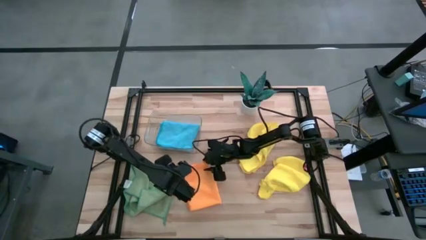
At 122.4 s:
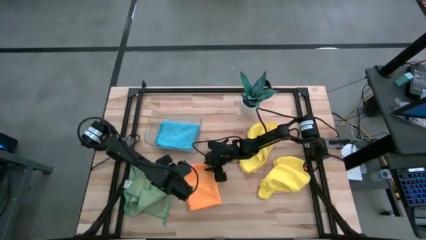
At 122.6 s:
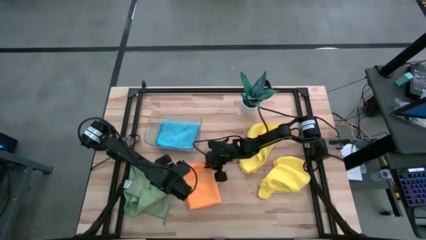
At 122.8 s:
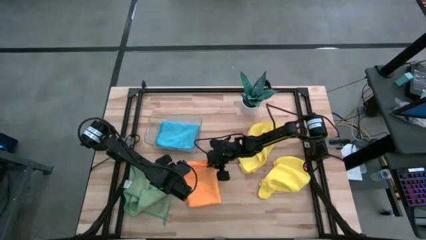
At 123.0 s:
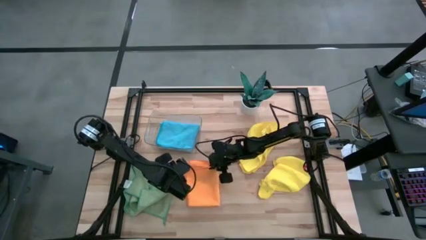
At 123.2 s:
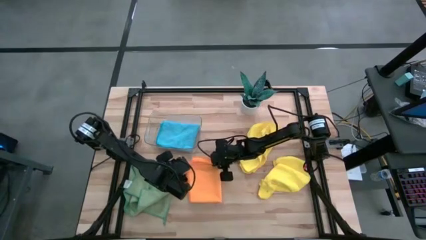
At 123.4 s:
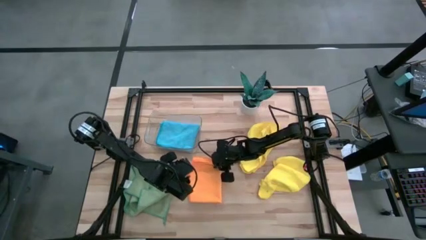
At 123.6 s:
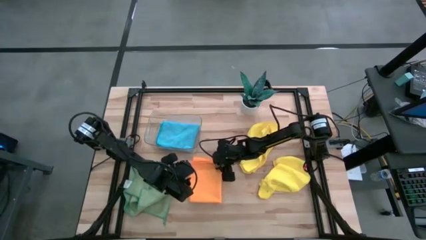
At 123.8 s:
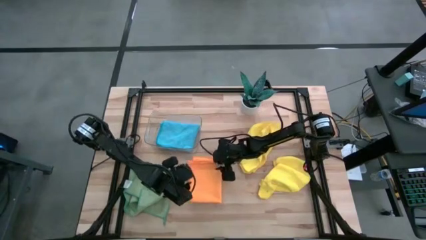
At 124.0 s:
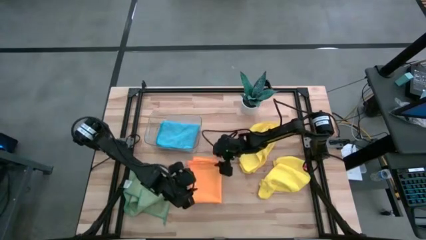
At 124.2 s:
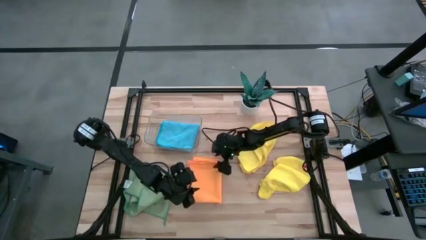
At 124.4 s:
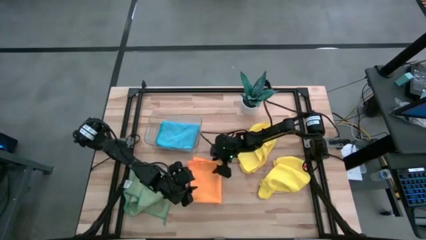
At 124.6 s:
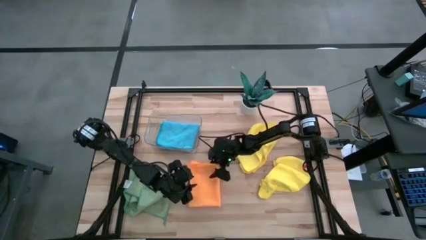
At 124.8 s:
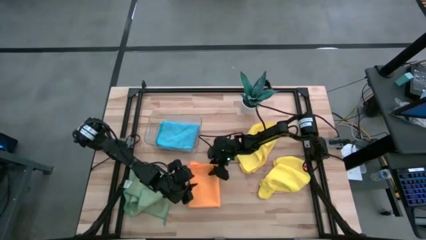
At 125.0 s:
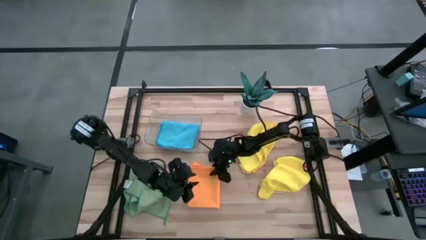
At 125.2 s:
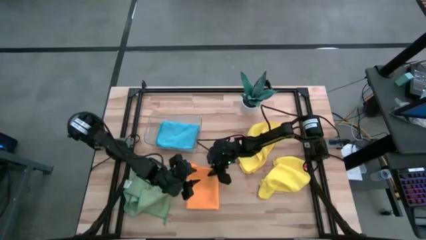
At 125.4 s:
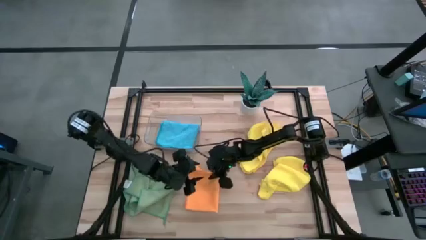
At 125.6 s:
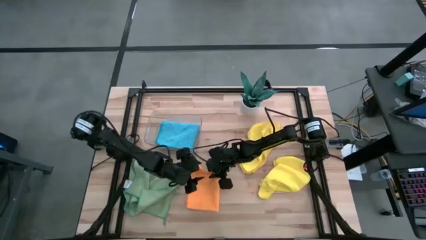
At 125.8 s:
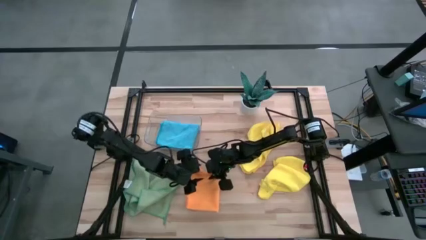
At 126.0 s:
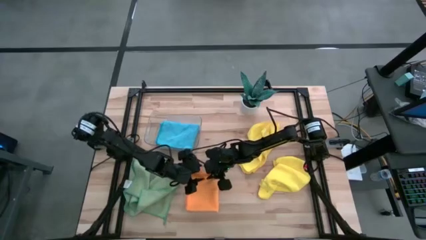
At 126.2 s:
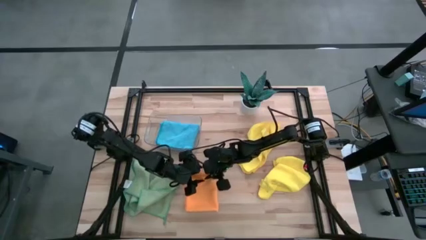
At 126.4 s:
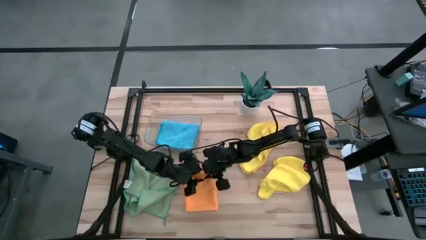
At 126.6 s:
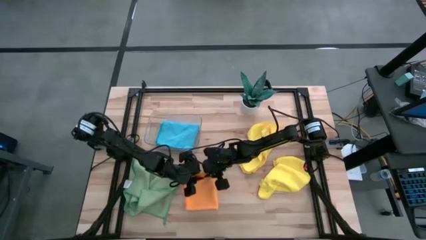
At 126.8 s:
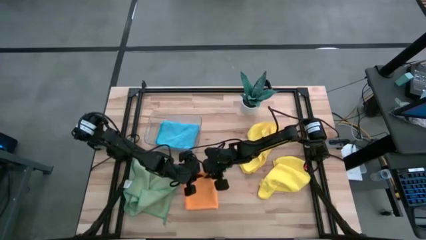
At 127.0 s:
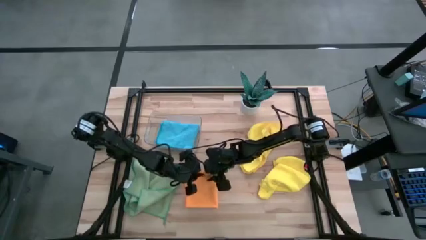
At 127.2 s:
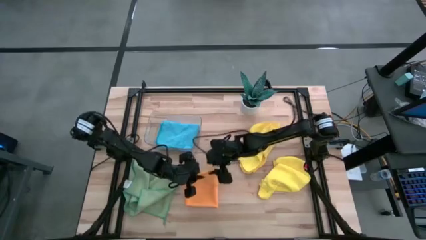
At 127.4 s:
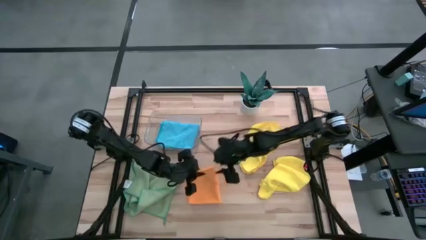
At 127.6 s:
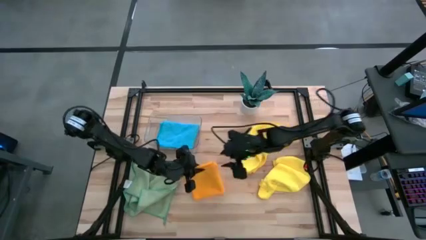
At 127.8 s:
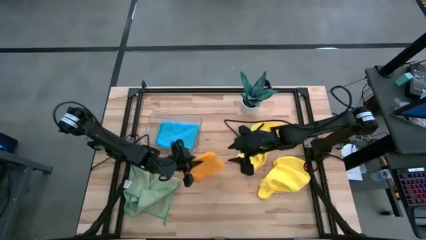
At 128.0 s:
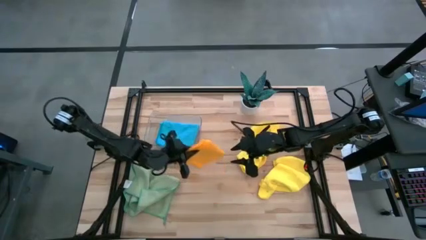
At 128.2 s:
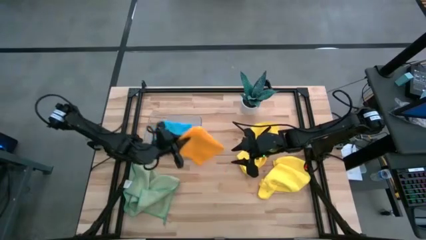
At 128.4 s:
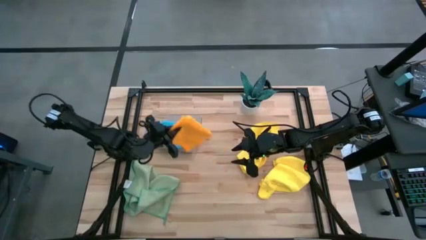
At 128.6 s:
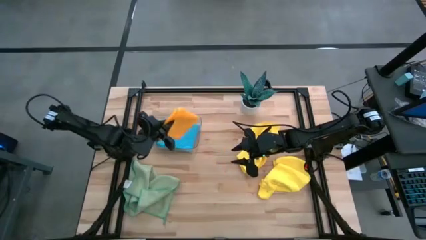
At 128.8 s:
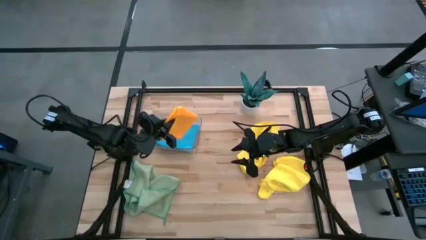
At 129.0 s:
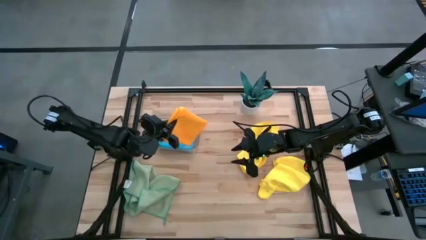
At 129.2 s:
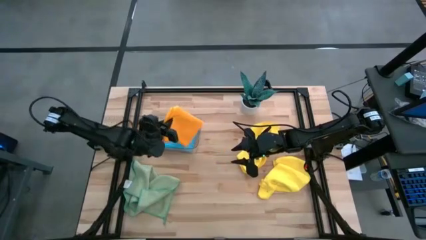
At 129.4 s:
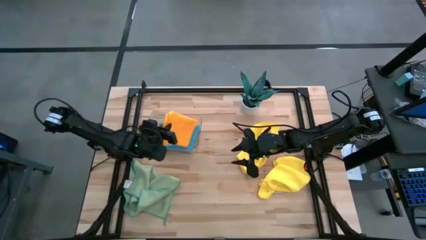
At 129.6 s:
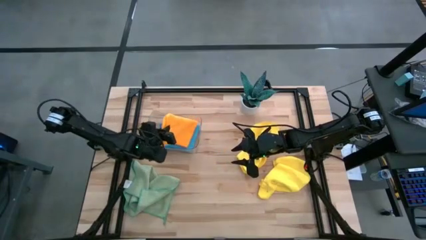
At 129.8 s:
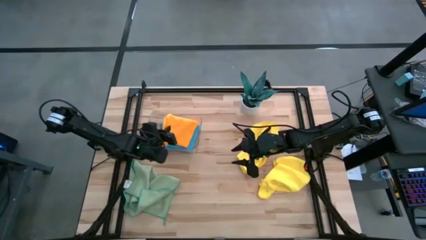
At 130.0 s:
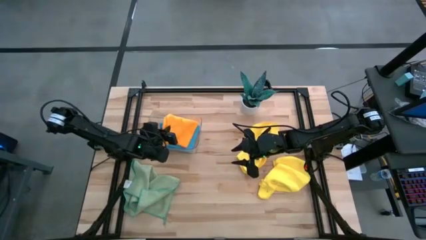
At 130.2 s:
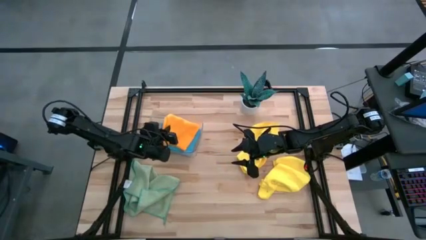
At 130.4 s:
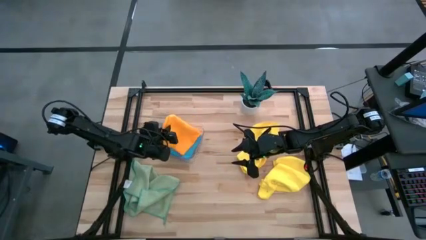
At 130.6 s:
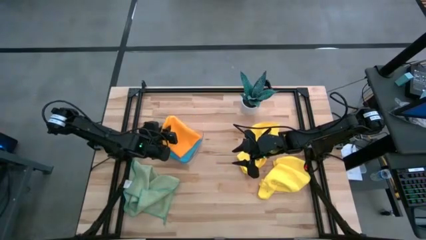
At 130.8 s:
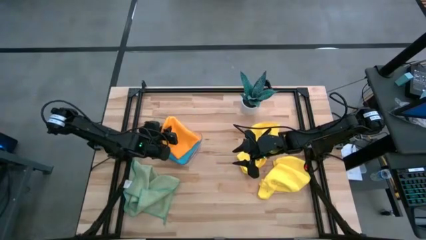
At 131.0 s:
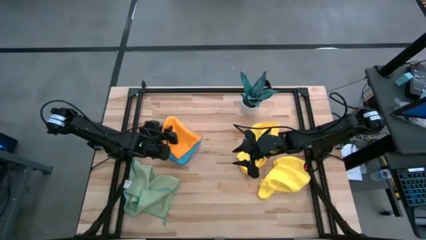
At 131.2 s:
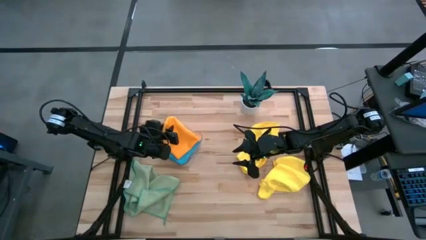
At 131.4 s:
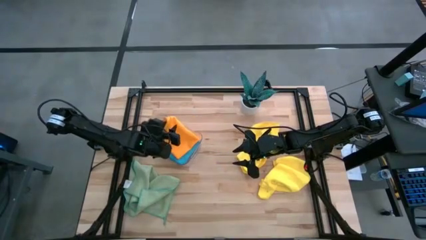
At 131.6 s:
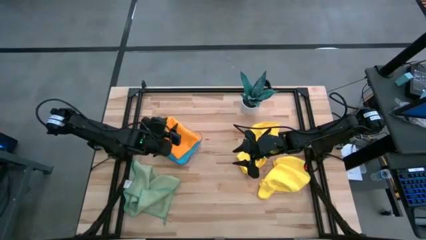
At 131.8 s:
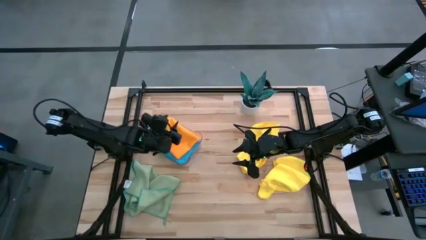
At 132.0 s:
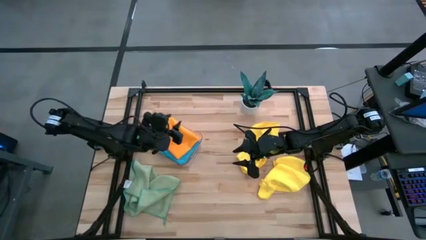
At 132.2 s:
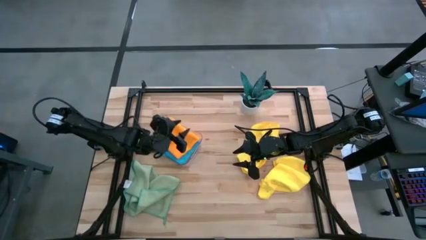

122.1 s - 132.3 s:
Task: Fold microfiber towels
Put the orange microfiber cloth into the transparent bin

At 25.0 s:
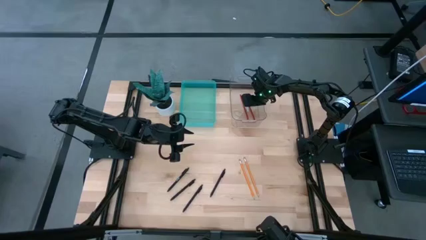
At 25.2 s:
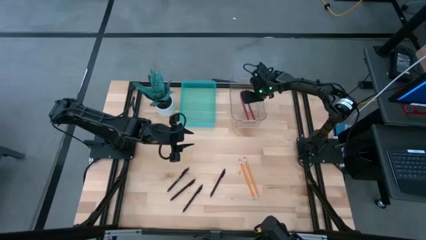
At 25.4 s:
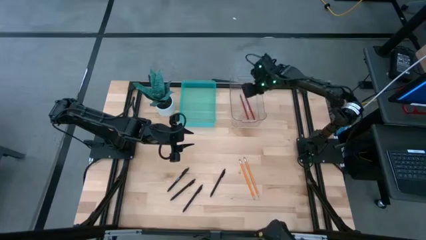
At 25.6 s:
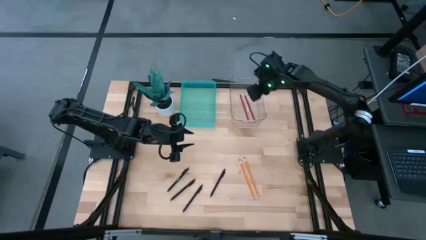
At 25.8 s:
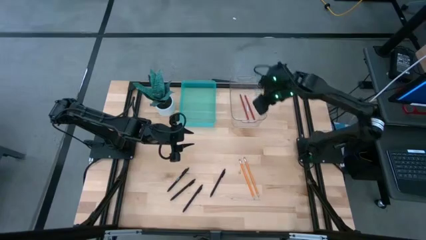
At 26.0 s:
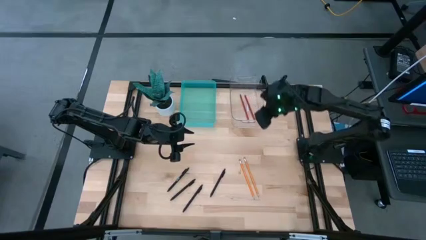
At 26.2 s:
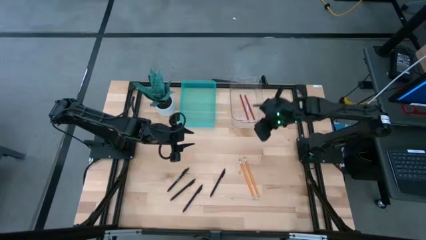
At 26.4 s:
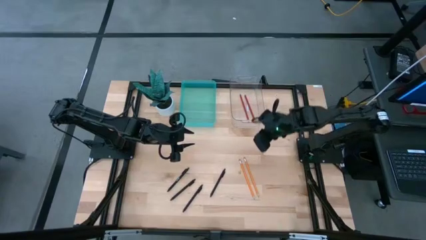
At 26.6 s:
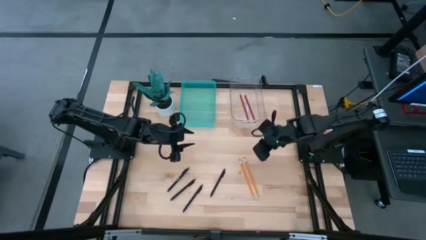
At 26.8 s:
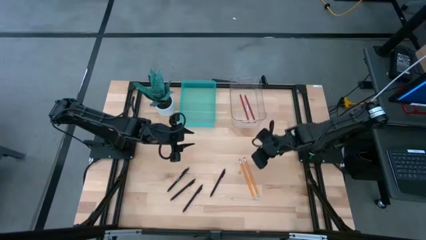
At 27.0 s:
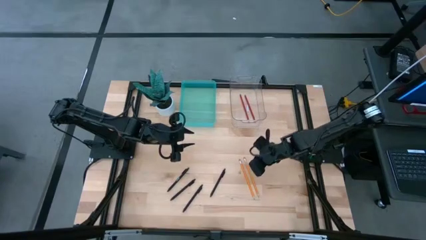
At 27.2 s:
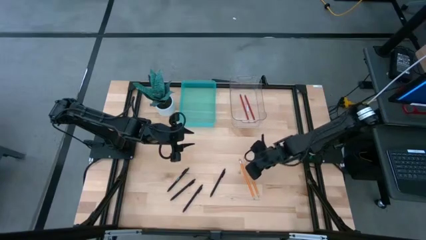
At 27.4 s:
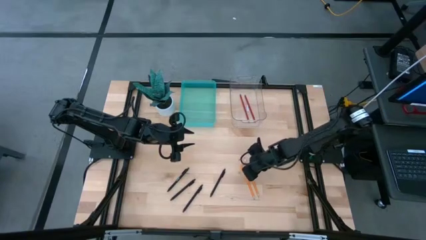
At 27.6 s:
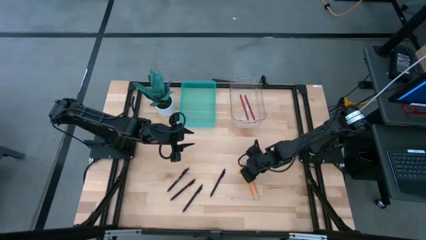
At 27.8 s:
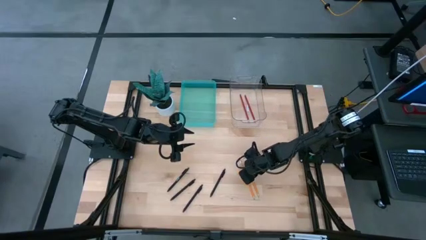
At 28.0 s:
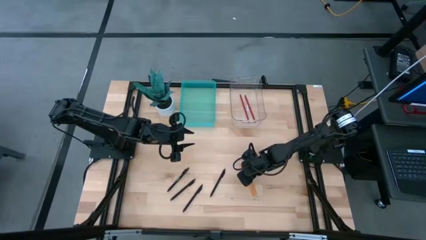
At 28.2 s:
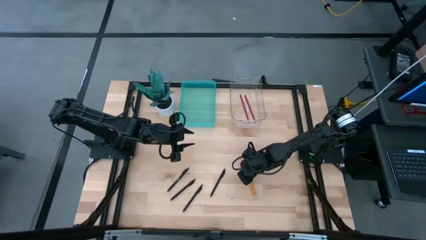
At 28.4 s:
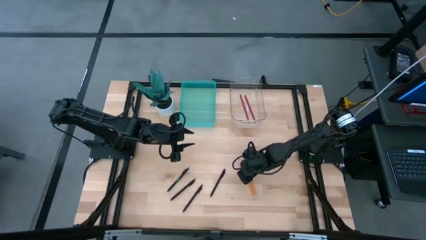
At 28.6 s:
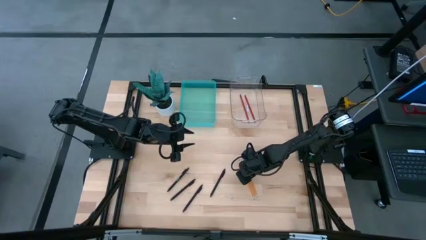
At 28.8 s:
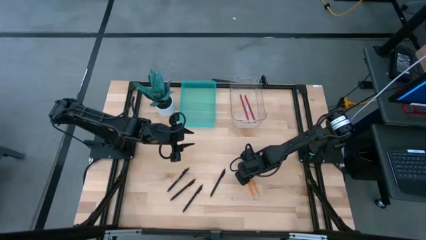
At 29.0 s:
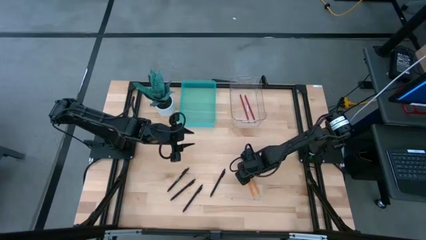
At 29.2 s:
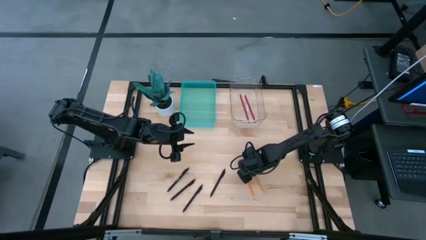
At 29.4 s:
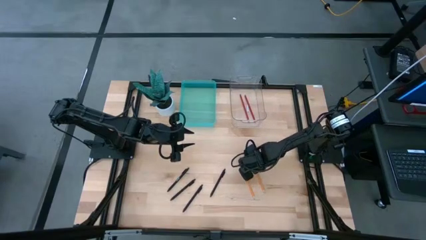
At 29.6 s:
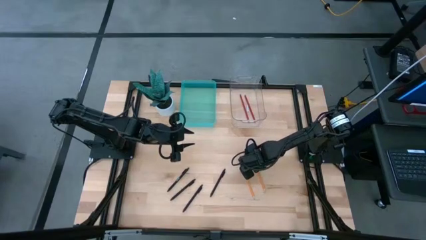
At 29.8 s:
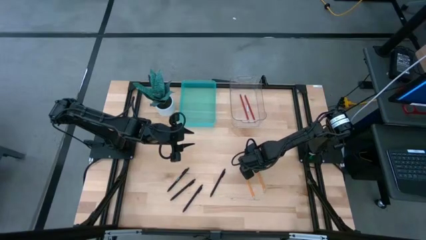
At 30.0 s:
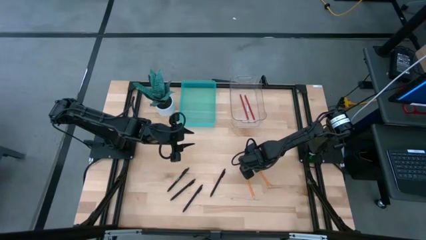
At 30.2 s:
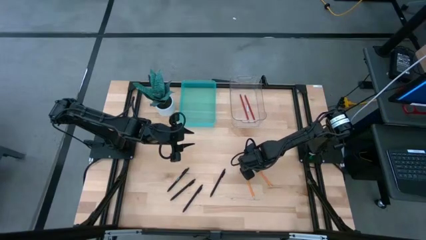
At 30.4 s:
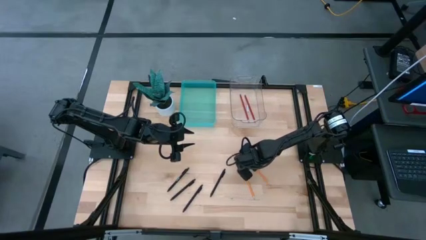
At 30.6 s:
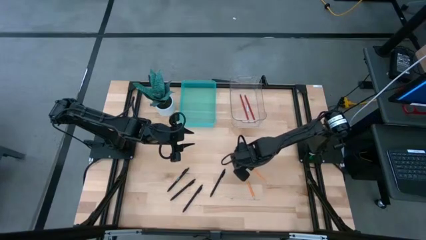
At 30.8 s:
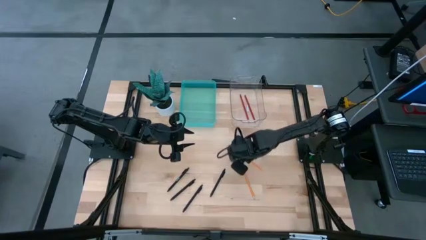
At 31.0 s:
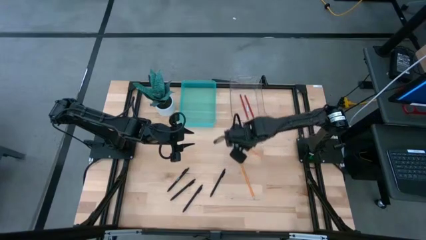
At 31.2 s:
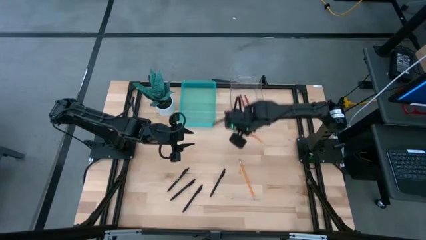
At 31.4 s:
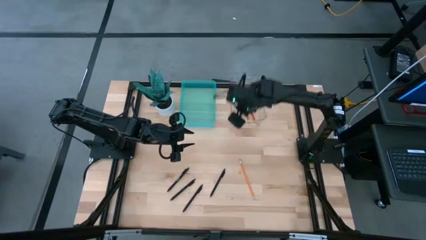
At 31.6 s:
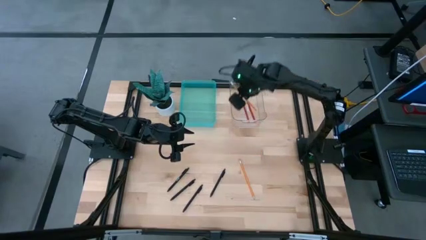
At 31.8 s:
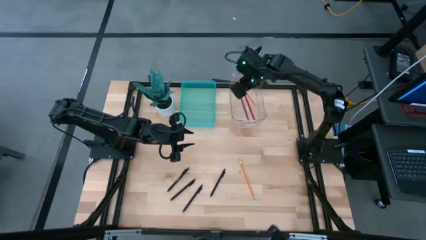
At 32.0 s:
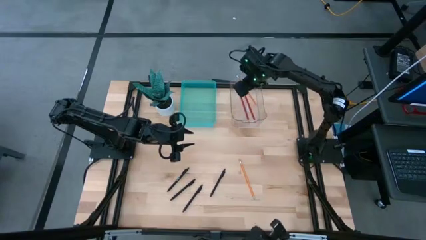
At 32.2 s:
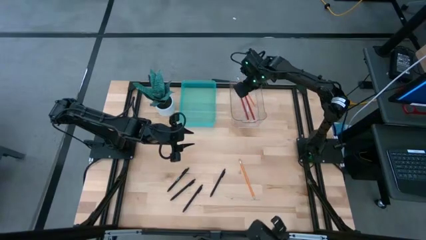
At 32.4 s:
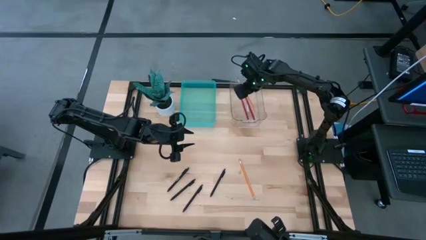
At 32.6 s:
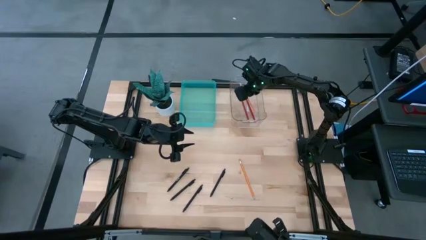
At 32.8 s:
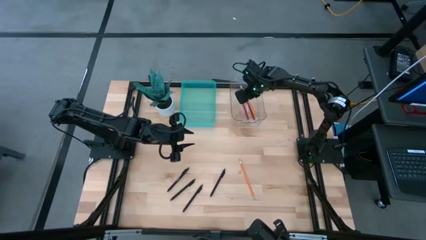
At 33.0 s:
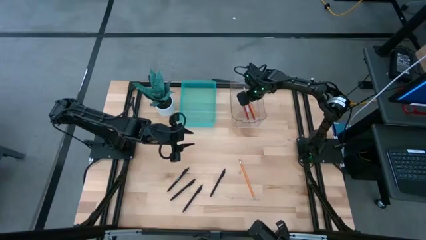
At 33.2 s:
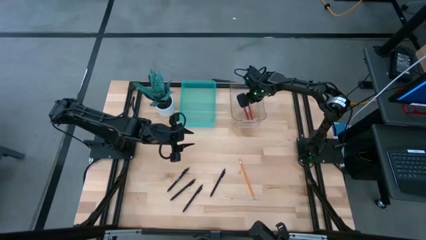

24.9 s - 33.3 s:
Task: Sort pens & pencils
Put the yellow pencil into the transparent bin
